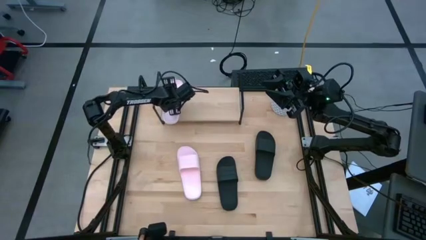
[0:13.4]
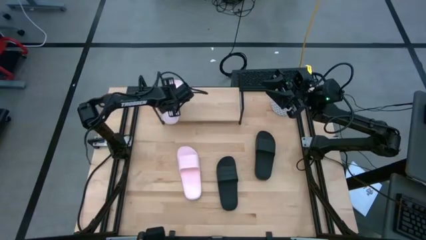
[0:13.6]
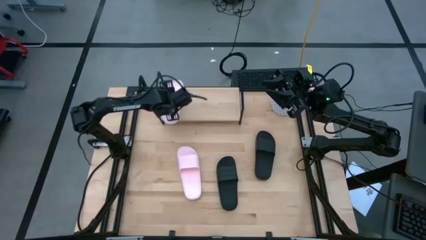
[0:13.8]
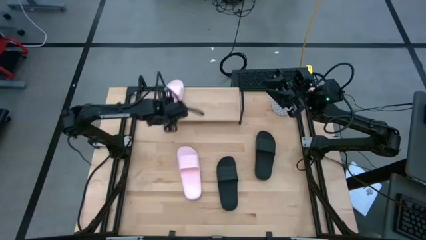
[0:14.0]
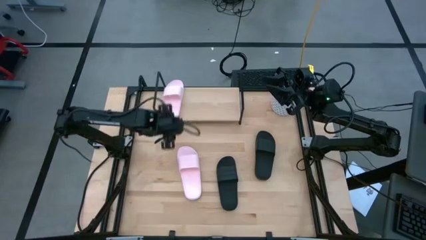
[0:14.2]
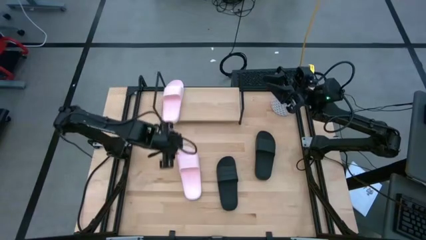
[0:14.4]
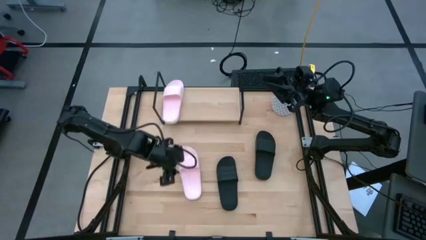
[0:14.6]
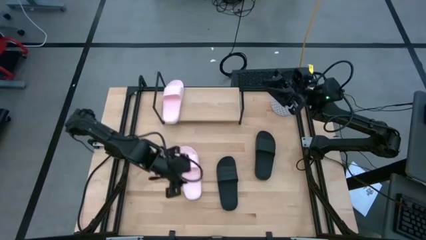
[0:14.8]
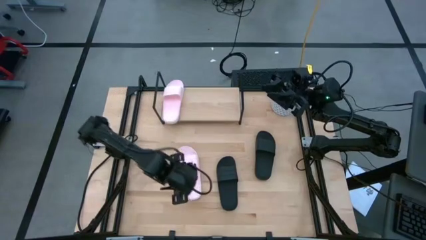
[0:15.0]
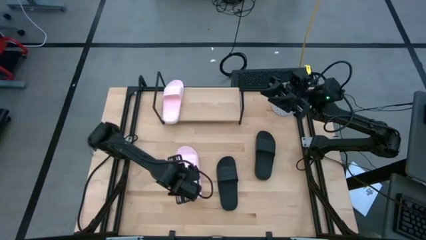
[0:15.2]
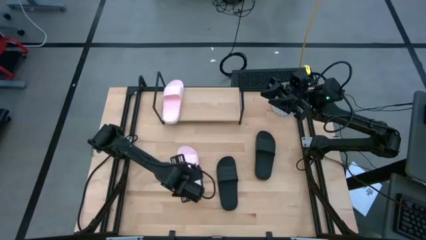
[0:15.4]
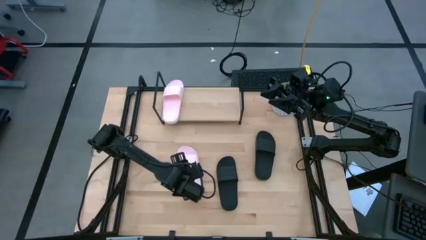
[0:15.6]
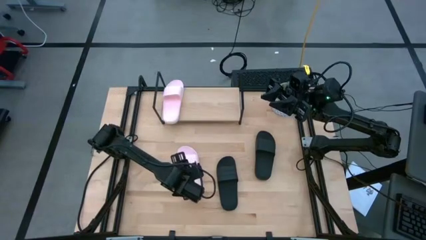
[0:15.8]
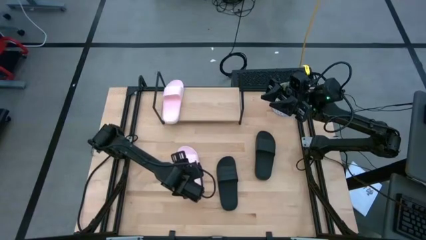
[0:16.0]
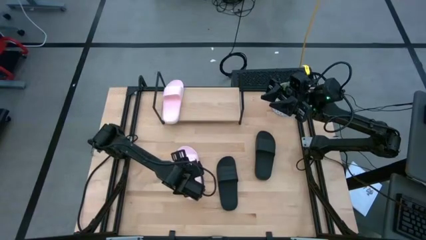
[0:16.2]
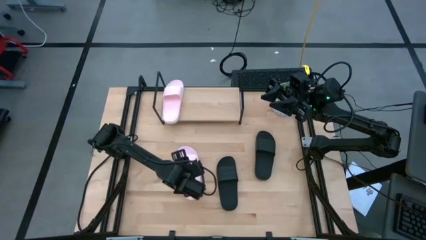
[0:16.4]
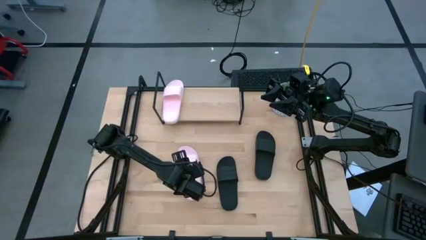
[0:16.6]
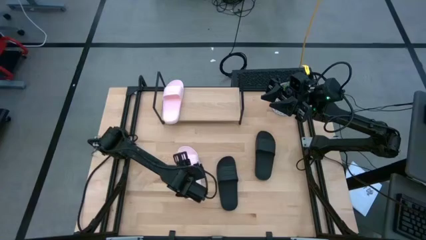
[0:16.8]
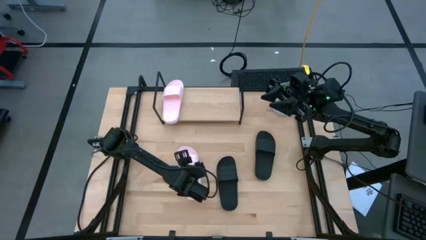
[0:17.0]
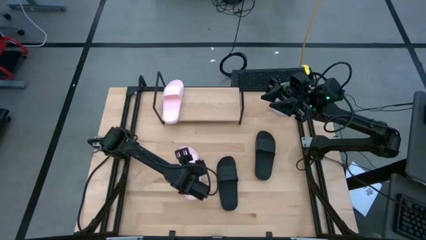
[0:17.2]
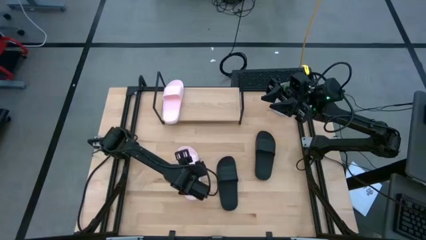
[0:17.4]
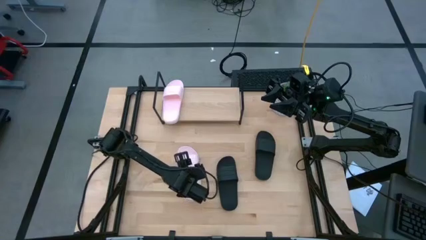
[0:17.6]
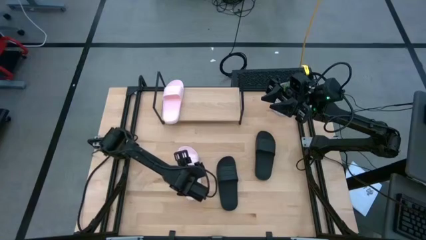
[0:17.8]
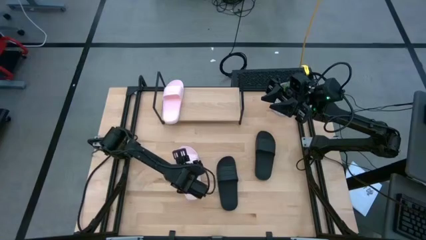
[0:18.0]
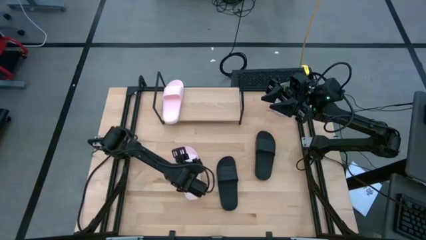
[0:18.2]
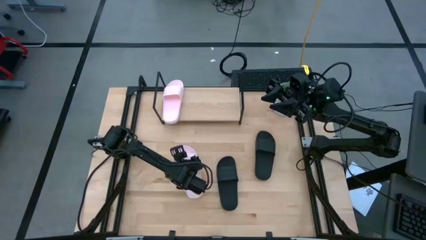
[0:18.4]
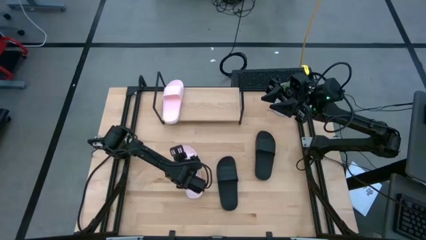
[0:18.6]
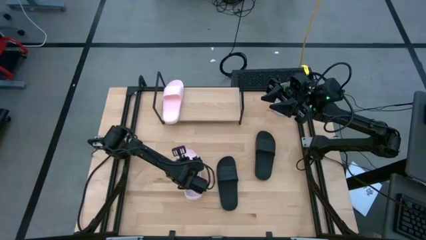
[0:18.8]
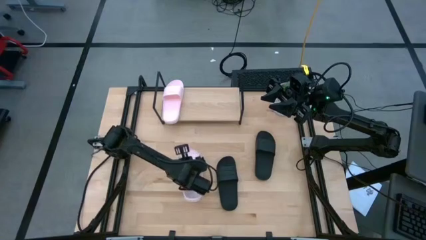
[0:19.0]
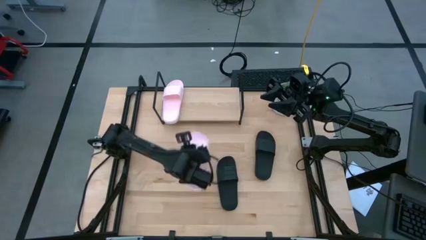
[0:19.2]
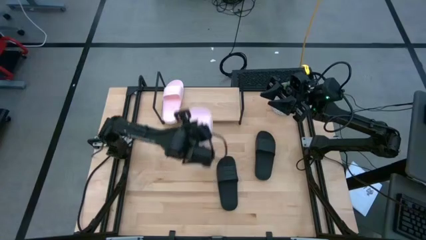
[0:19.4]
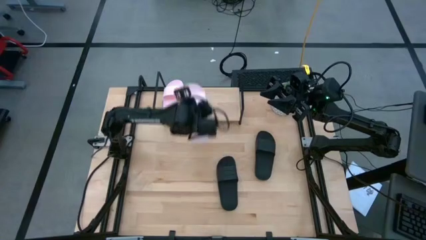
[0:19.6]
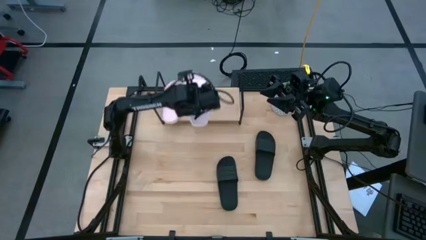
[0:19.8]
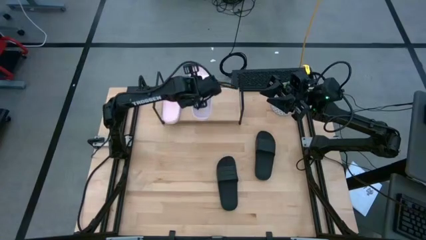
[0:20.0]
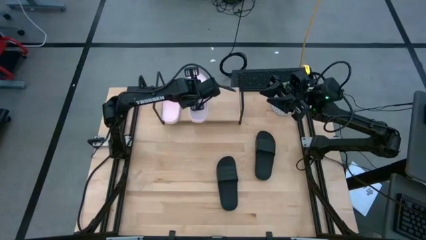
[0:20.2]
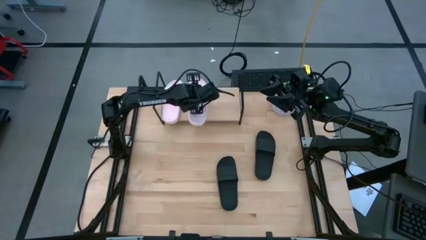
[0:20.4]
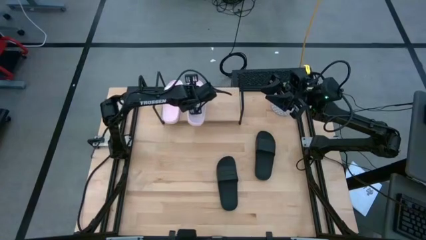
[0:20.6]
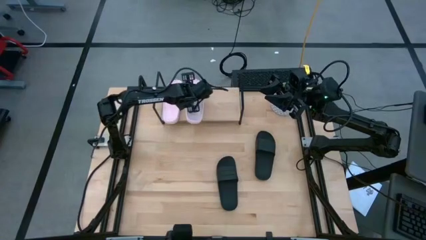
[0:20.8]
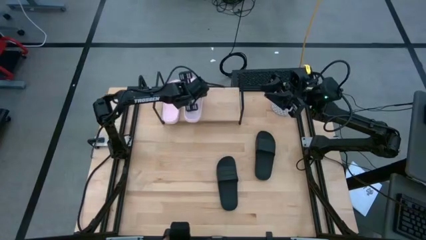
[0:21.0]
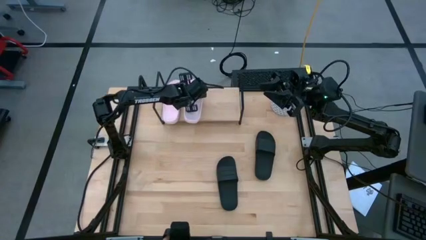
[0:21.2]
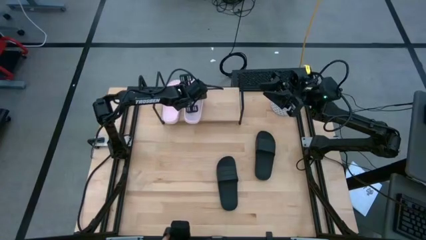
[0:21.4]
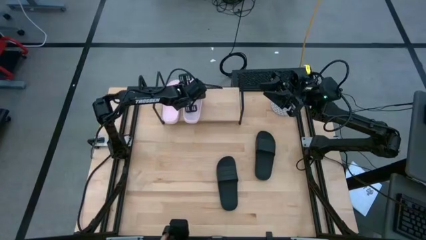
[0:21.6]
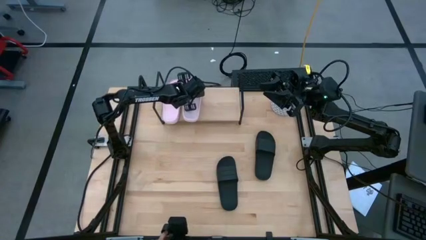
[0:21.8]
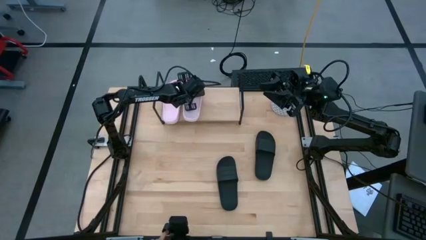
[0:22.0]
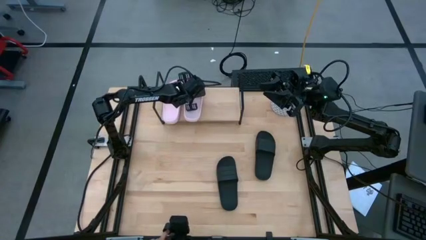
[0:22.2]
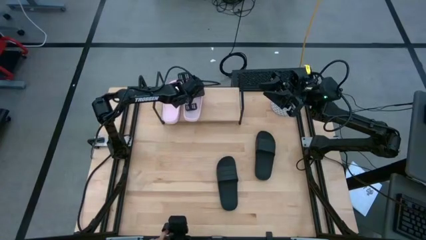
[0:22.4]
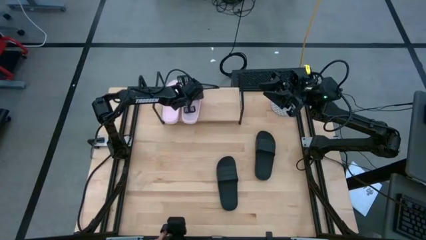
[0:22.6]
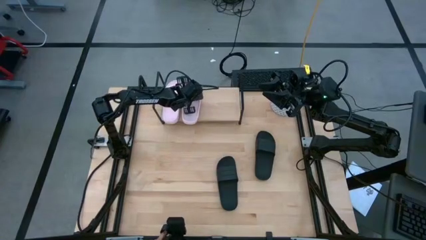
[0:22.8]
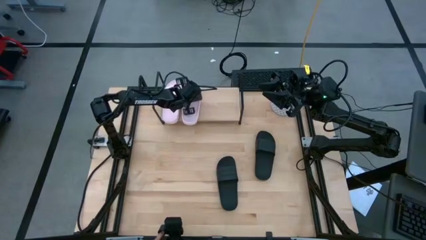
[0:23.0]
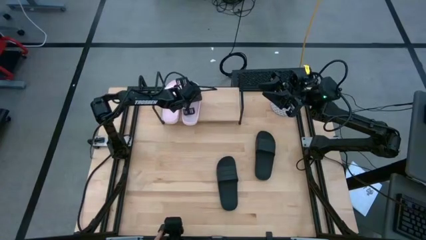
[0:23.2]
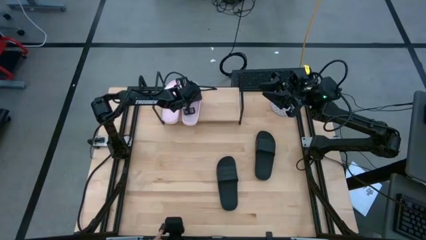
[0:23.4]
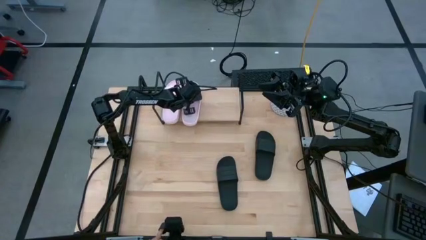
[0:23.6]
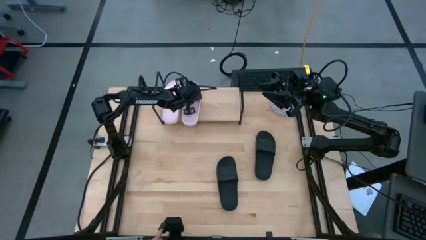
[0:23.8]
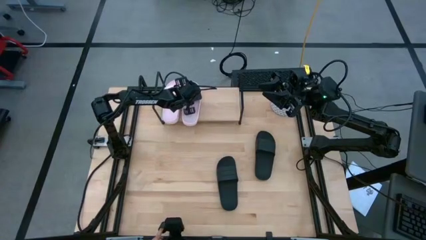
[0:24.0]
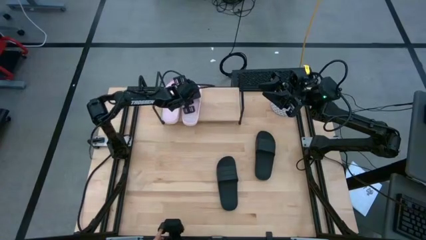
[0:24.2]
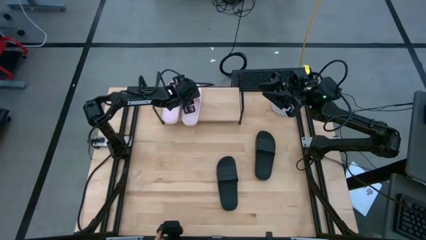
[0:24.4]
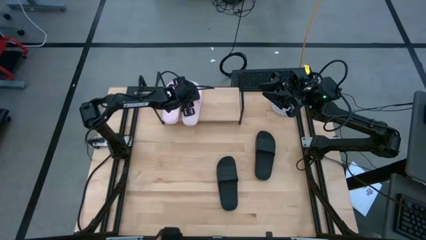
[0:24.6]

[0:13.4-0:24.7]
Task: Pick and place slides into the shelf
Put the pink slipper on the shelf
